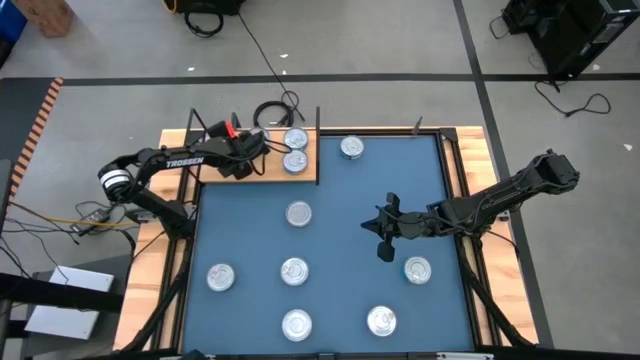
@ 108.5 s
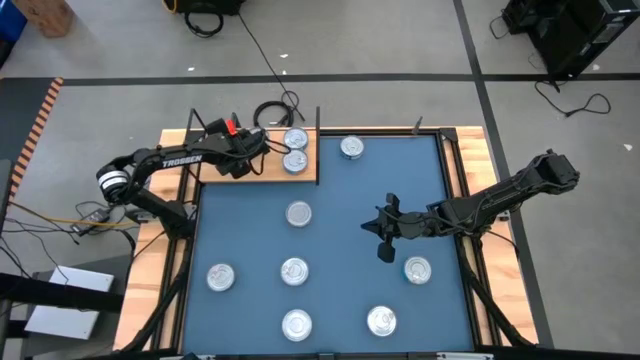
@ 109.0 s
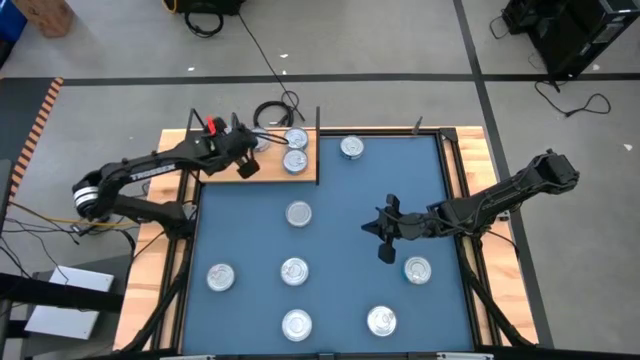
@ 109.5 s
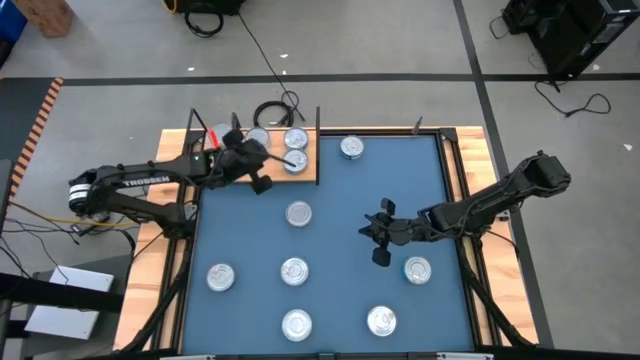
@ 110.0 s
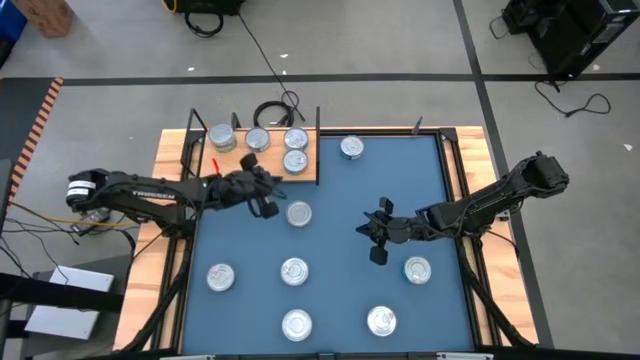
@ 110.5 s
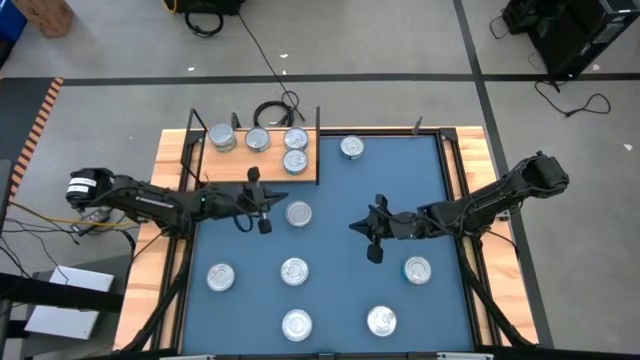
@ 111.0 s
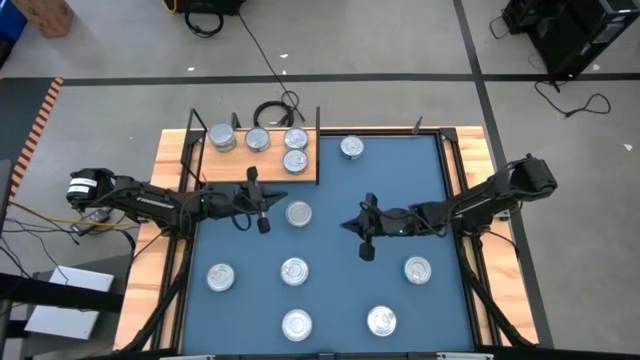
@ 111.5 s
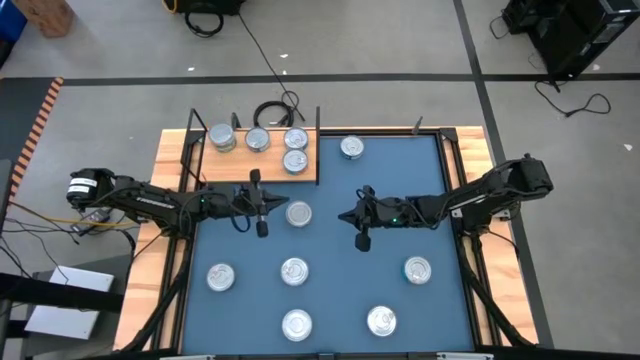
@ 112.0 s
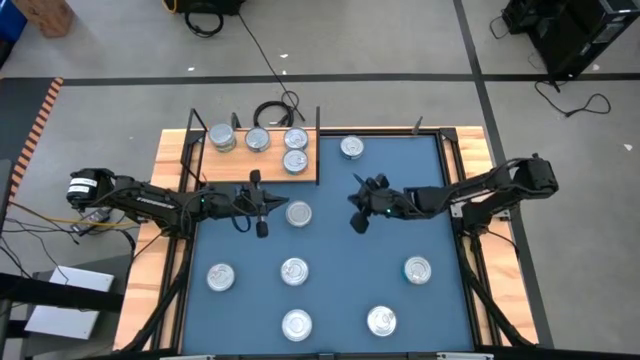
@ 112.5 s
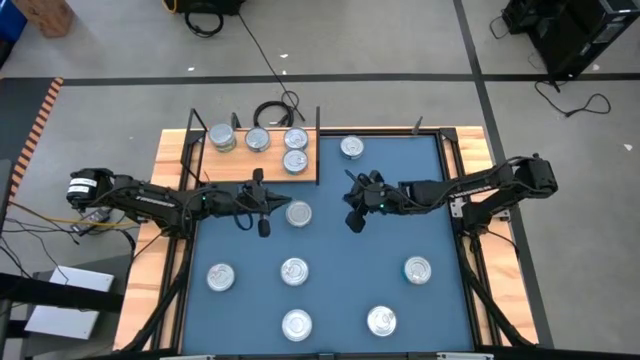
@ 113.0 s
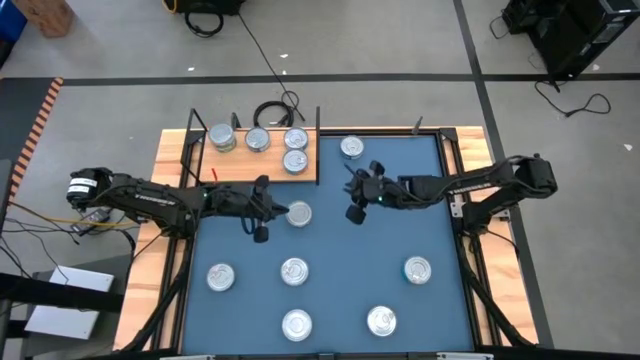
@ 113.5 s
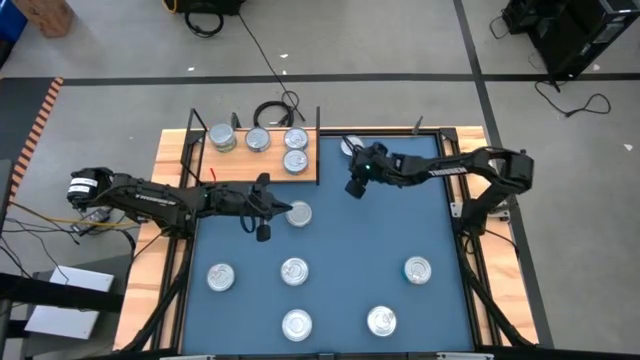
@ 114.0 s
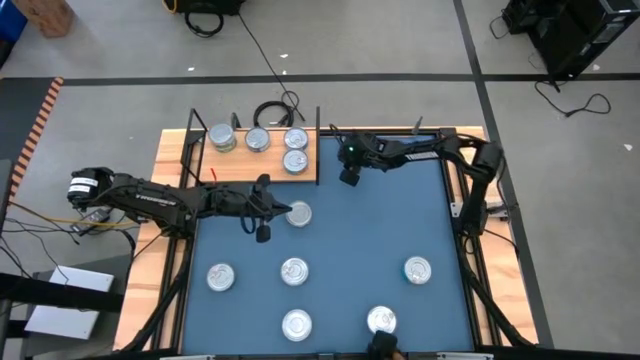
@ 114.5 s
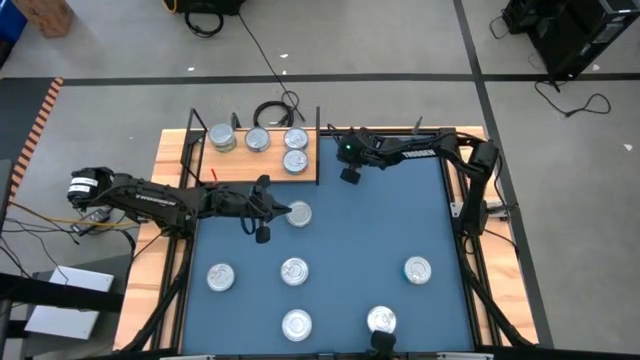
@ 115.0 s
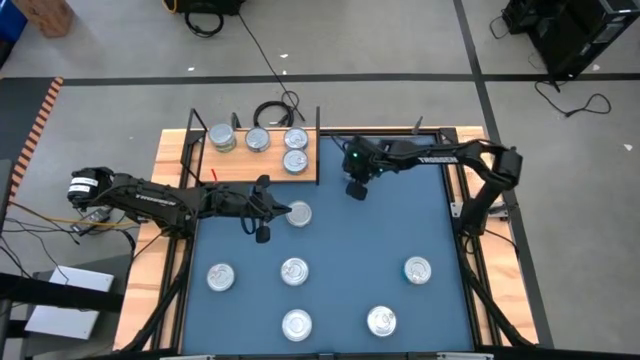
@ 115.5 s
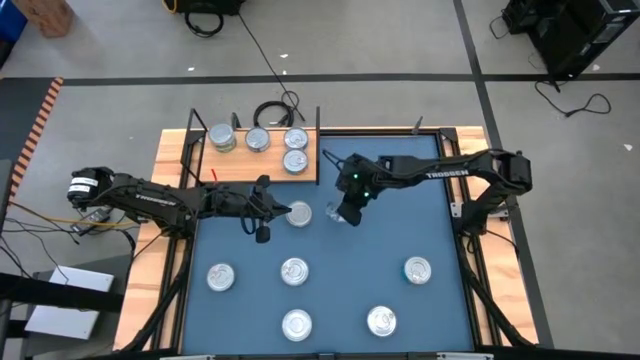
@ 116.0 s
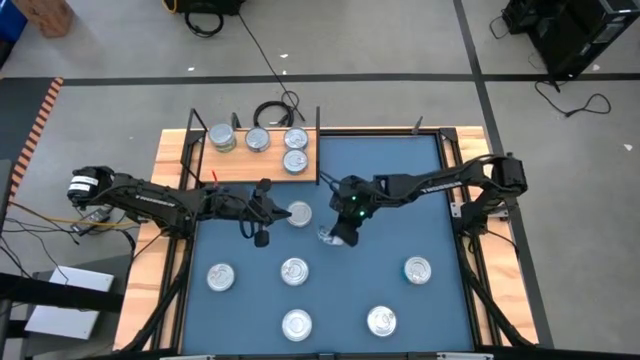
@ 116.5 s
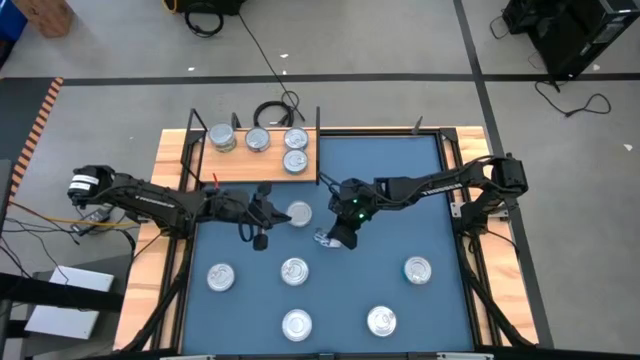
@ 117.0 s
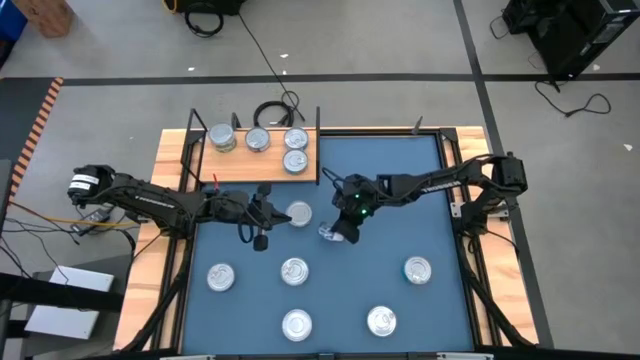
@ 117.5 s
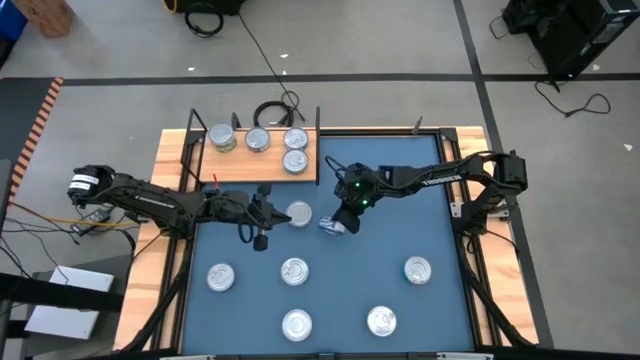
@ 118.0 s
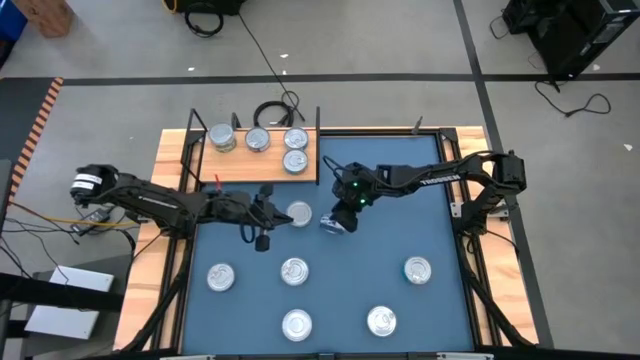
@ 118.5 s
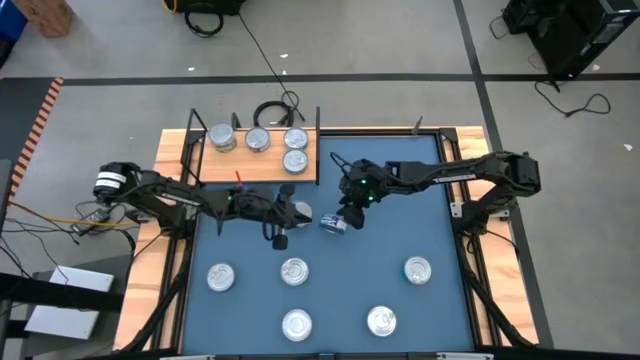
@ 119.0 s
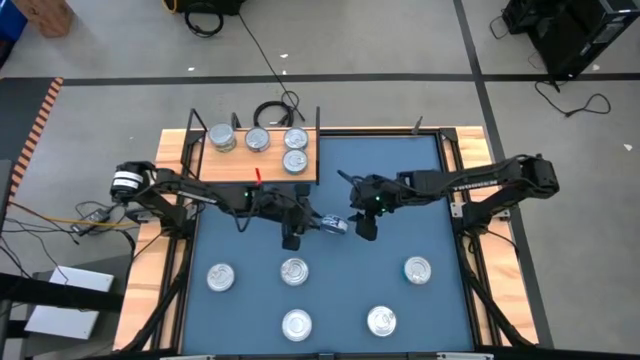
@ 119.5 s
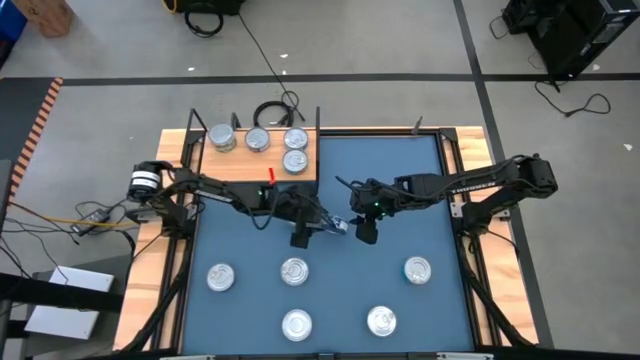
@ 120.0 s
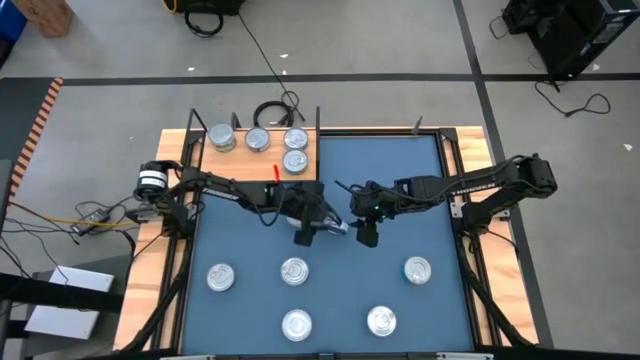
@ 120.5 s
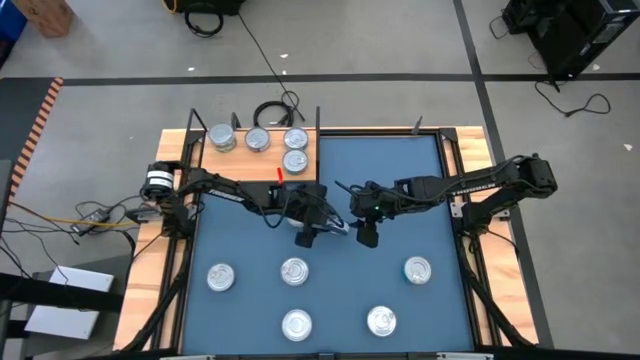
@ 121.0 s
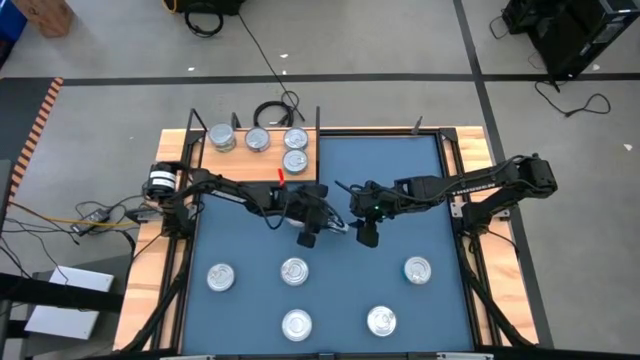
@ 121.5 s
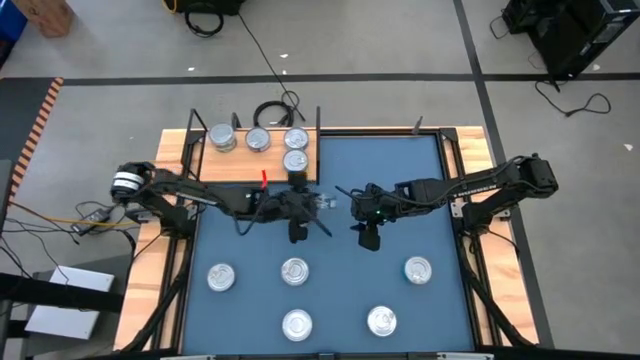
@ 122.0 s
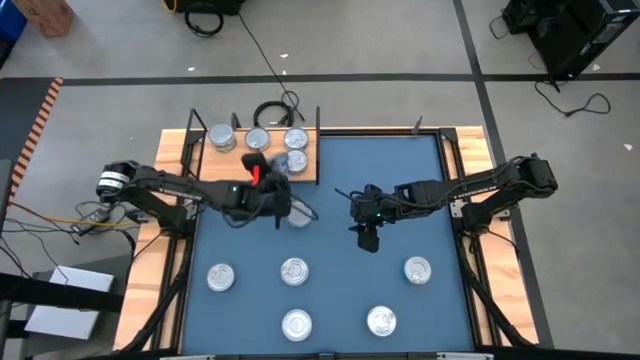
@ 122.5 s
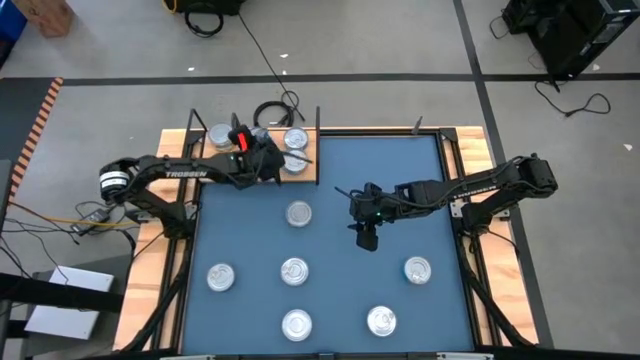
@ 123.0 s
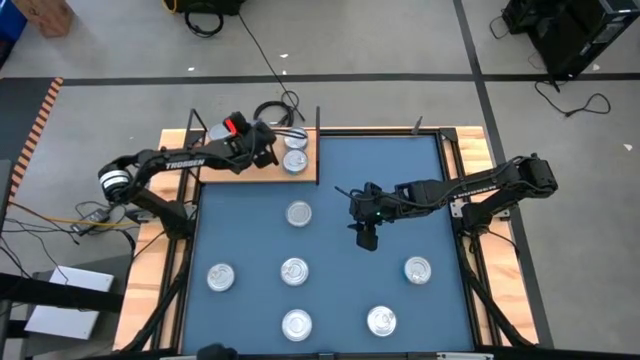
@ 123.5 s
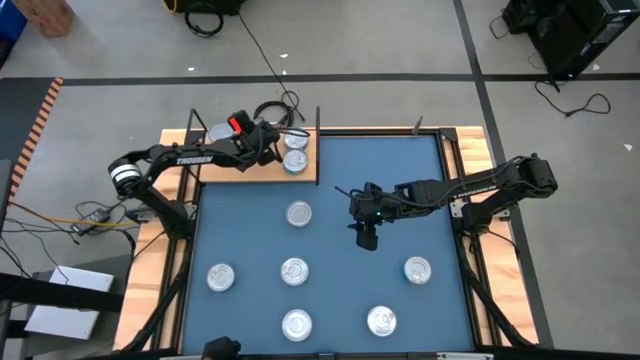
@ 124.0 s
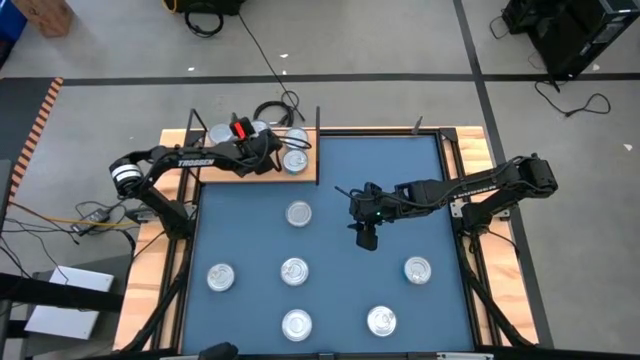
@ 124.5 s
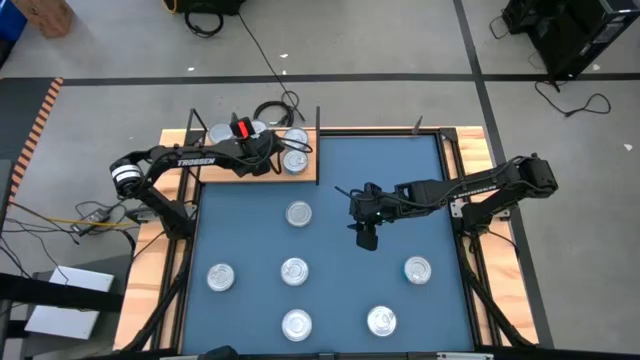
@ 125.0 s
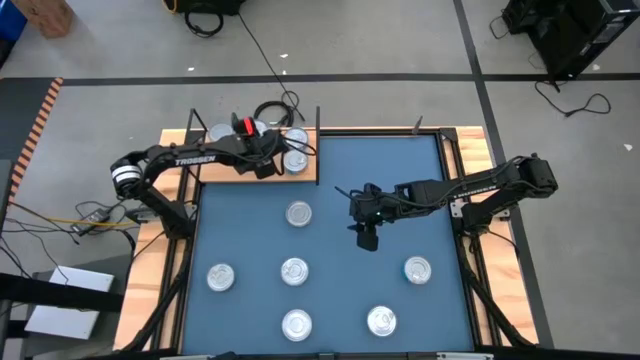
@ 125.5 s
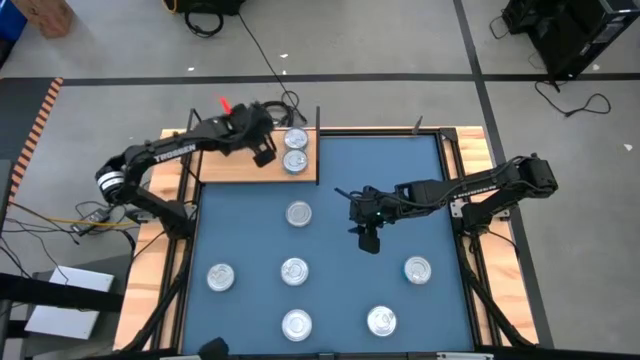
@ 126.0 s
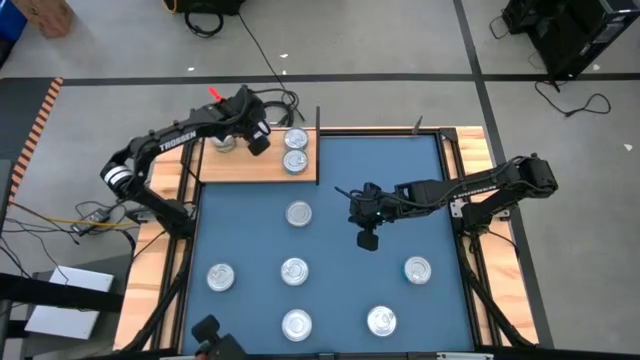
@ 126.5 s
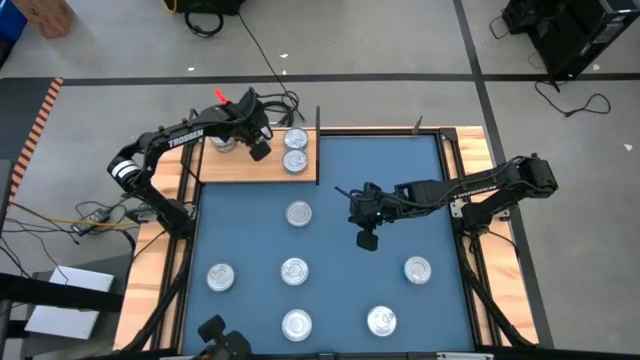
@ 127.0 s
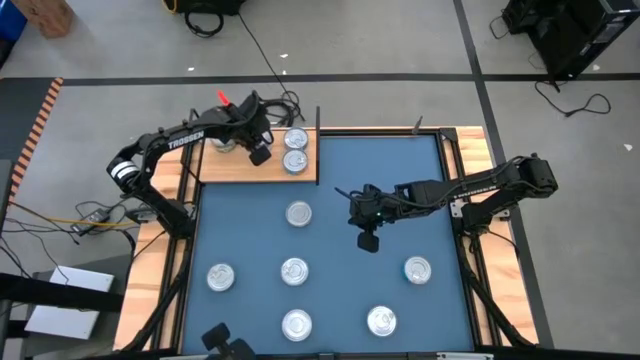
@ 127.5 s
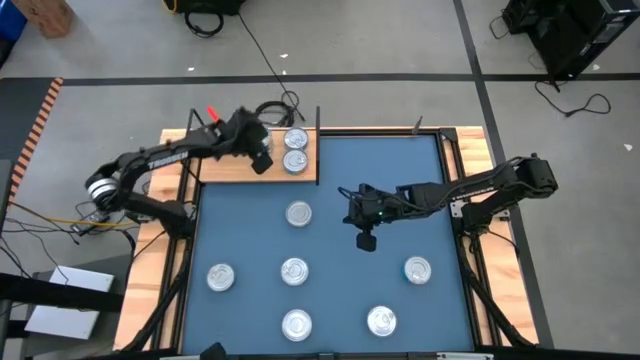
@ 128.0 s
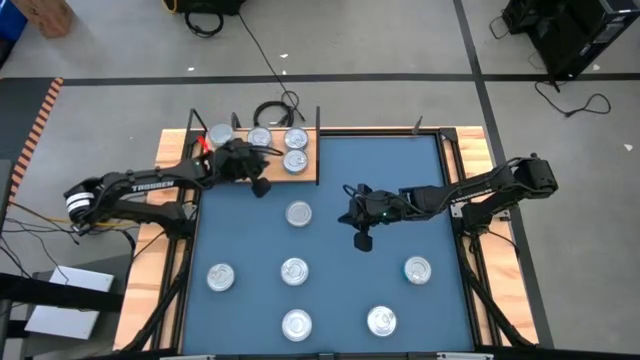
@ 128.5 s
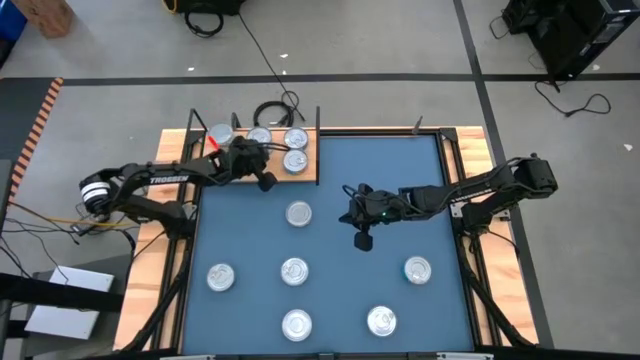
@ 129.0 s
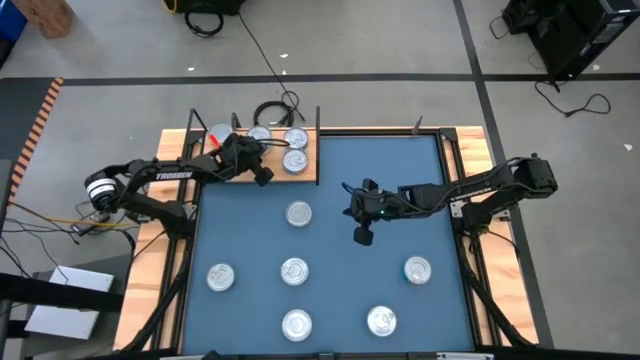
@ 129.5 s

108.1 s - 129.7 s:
Task: Stack canned seafood by type on shelf
Stack the blue tuna can on top of the blue tuna can on the shelf
